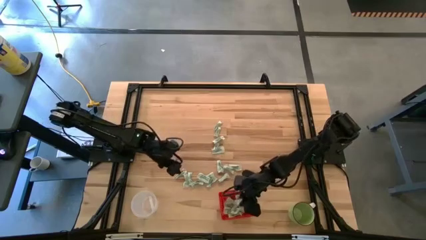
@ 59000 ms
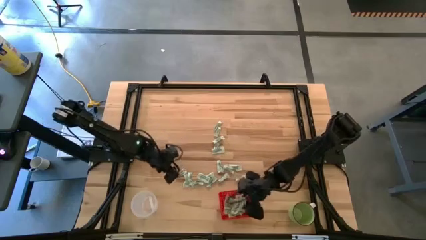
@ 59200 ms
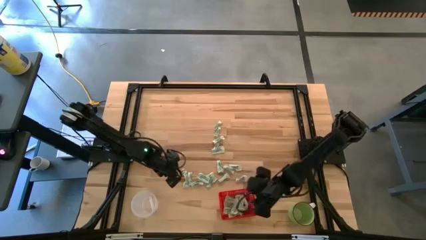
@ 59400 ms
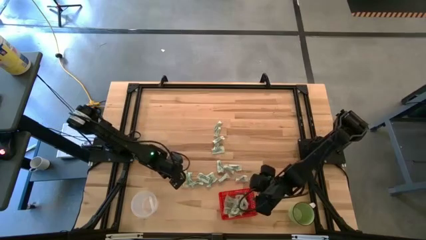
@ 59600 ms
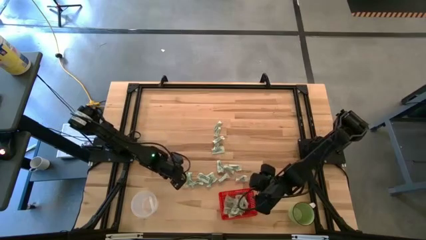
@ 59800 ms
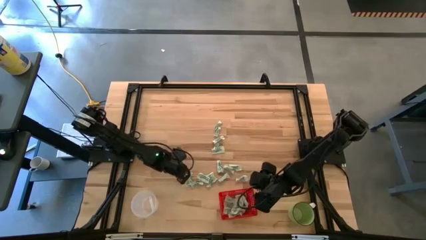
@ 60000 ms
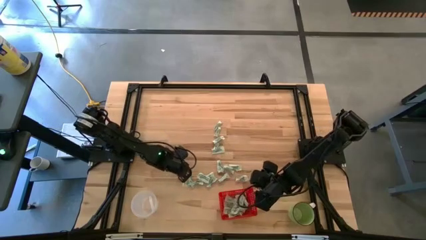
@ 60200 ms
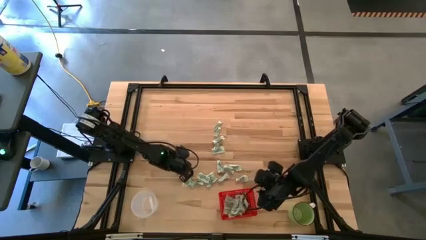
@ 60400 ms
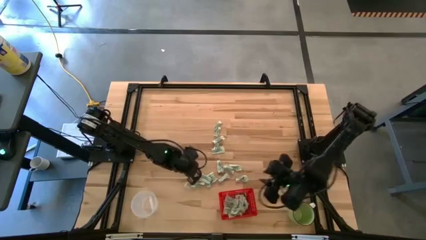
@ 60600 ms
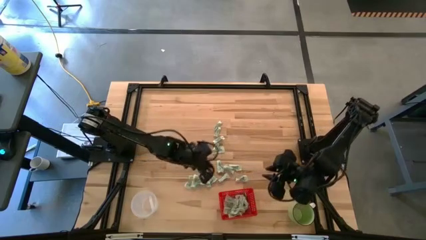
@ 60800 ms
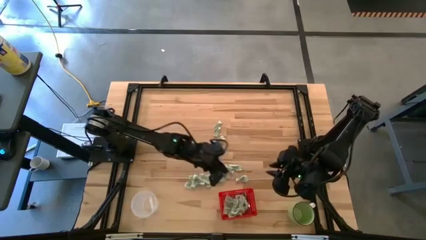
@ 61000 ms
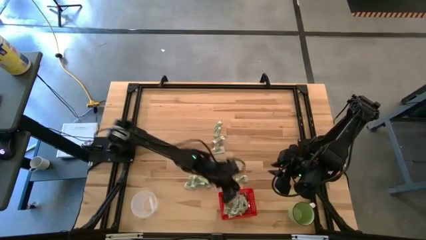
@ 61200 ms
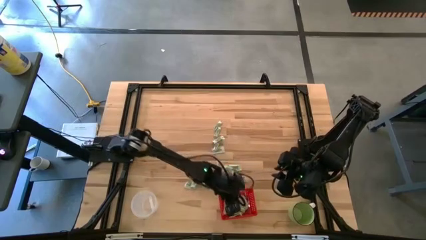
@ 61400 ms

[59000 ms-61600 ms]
Task: Pick and place items into bin
Put the white stevia packet into the red bin

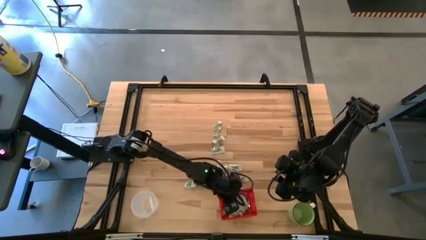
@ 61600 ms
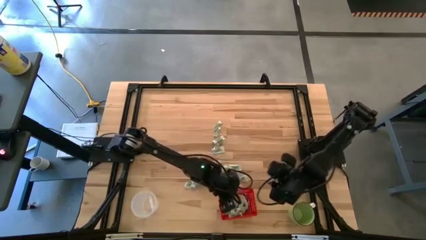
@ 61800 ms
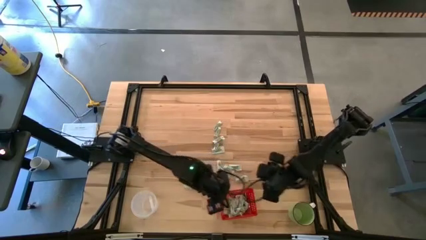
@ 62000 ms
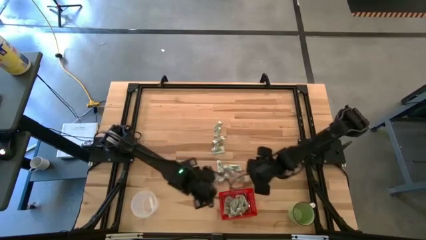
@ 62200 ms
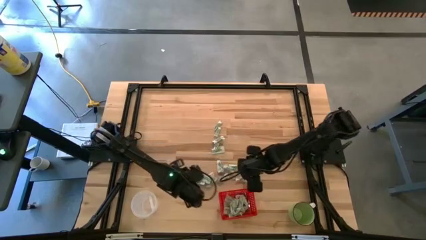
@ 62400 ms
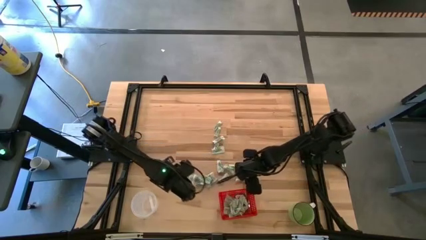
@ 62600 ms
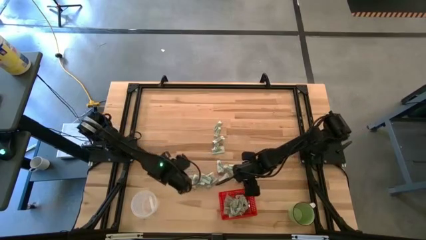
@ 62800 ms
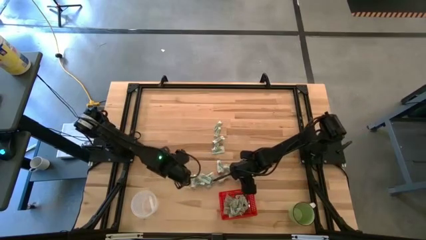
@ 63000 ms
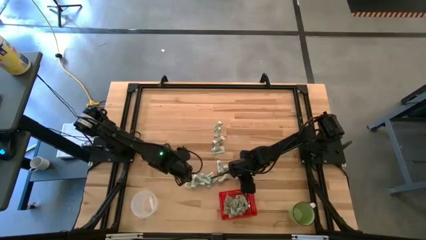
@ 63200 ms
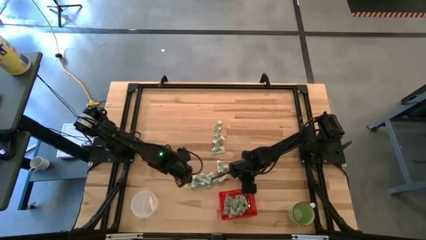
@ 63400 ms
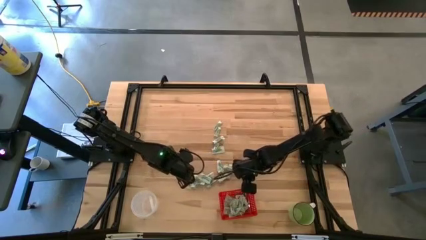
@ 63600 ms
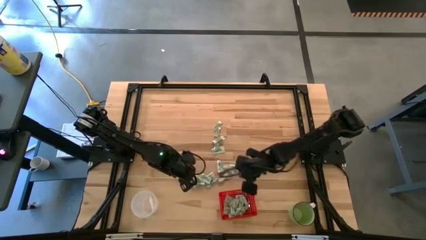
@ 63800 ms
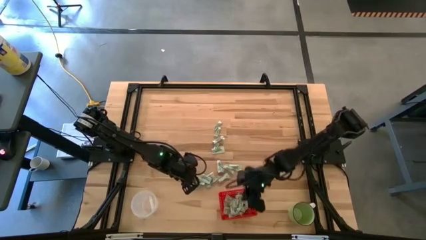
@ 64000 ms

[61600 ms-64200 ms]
Put the white stevia packet into the red bin

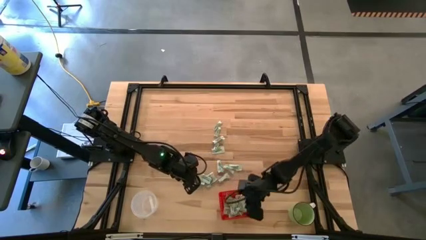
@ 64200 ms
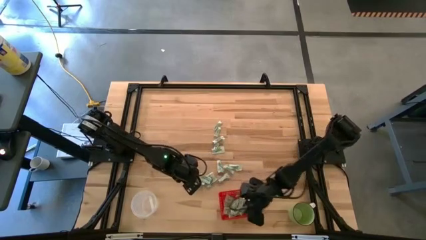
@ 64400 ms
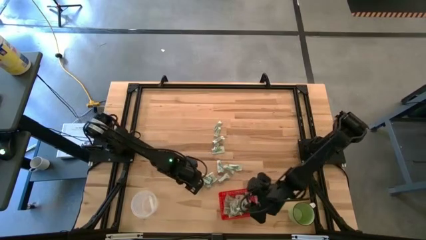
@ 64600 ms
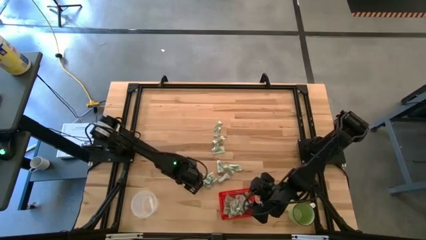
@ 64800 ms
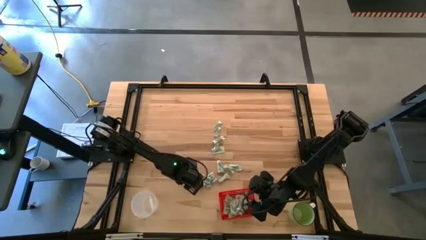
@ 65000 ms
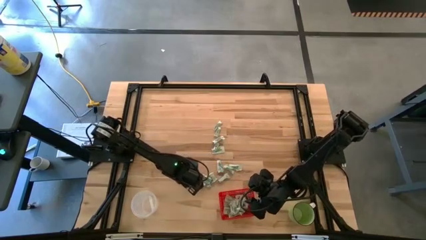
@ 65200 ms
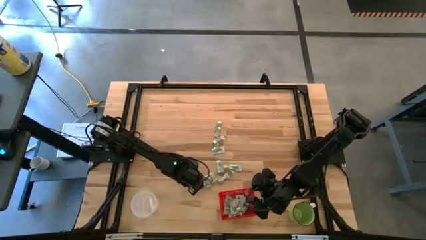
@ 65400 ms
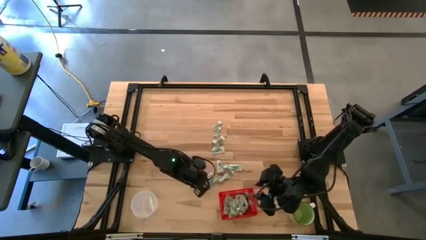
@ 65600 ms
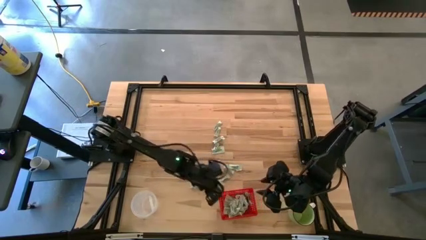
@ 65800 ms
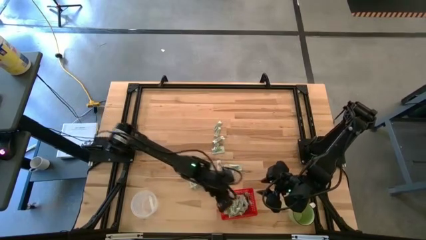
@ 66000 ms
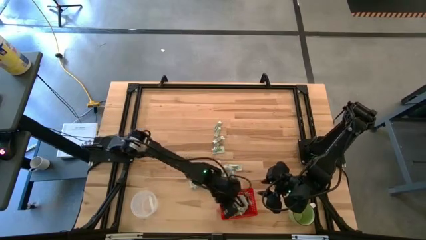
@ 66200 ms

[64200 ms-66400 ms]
Put the white stevia packet into the red bin

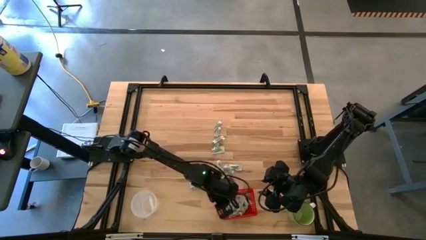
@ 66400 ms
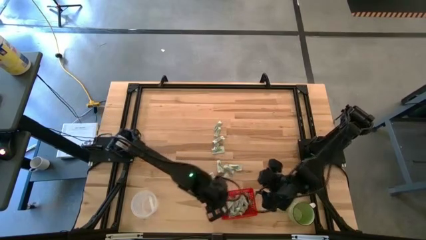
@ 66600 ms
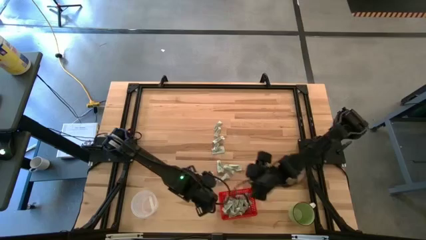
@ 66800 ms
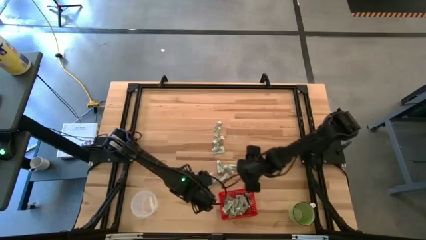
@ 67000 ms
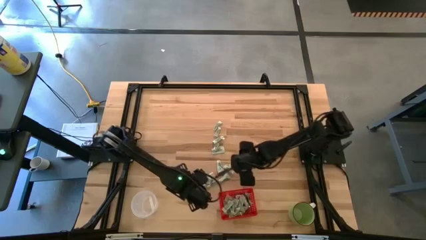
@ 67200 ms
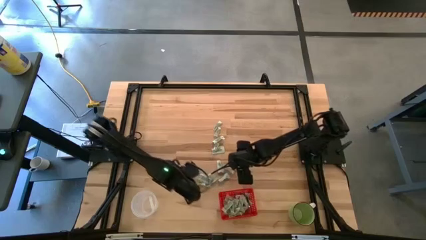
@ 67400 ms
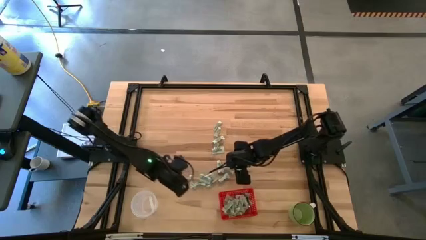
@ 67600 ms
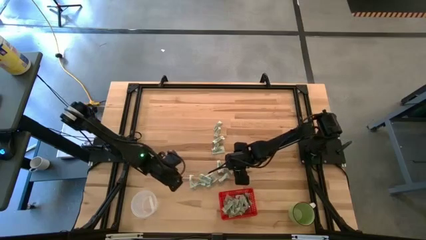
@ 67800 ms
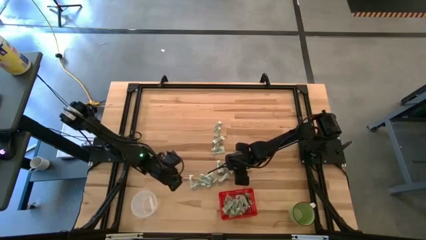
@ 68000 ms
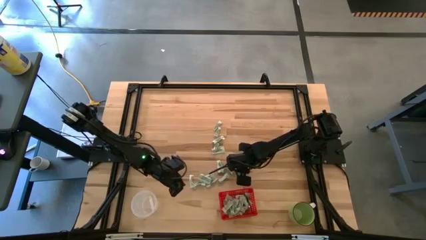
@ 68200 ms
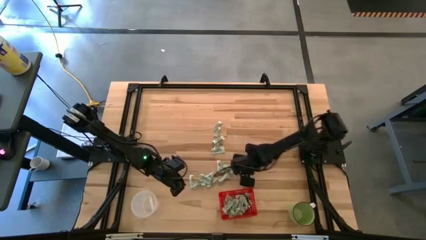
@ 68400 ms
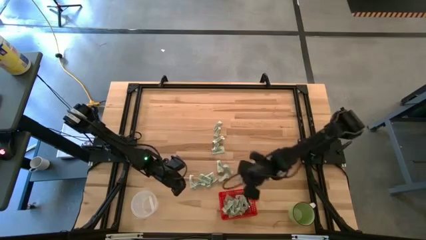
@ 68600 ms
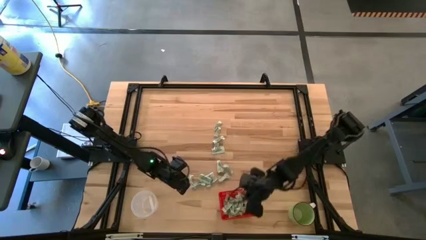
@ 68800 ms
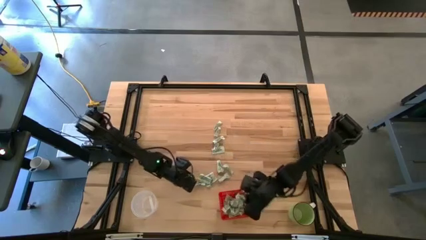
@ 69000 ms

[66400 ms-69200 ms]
Put the white stevia packet into the red bin

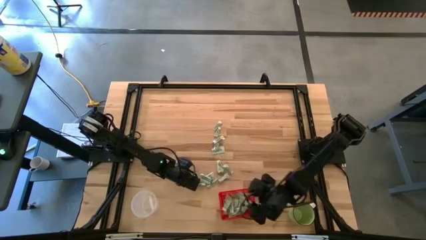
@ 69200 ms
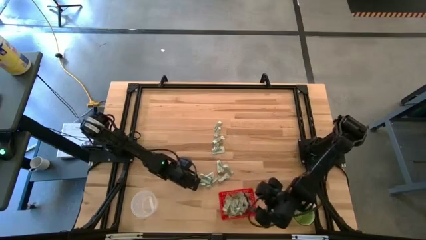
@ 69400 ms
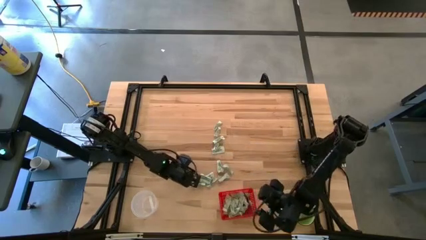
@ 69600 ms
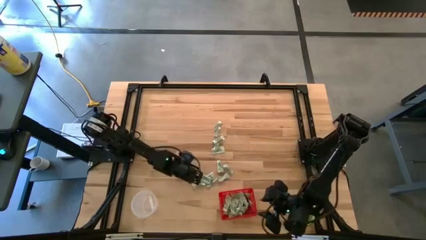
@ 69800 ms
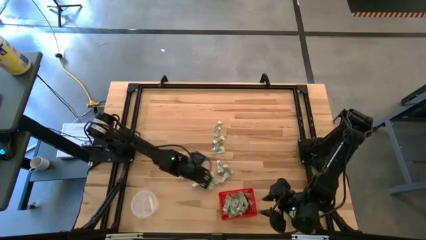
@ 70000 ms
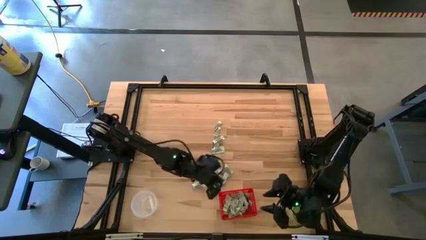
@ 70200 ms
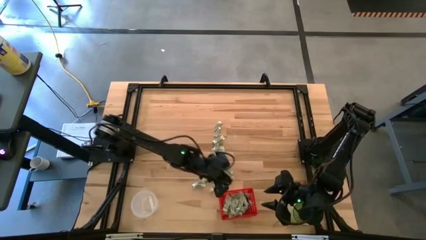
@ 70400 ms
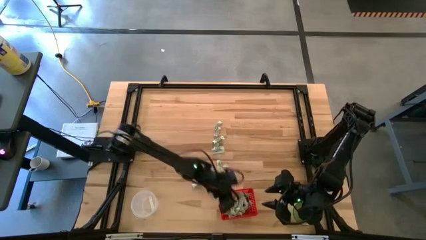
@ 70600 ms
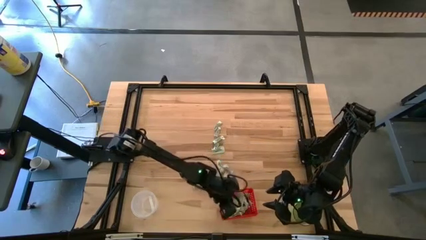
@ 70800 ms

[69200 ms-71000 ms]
Put the white stevia packet into the red bin

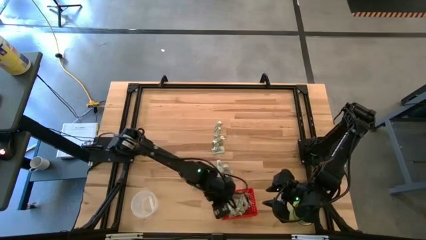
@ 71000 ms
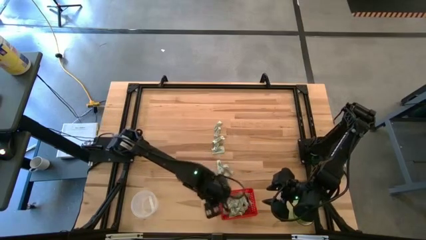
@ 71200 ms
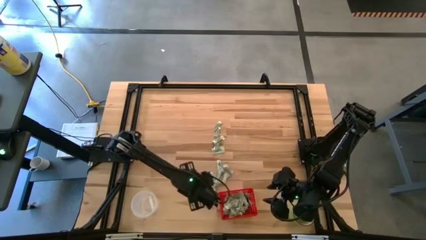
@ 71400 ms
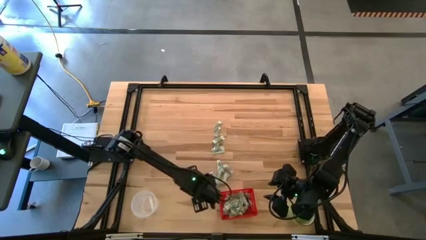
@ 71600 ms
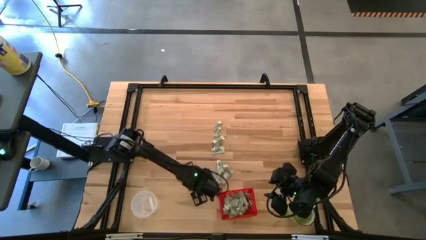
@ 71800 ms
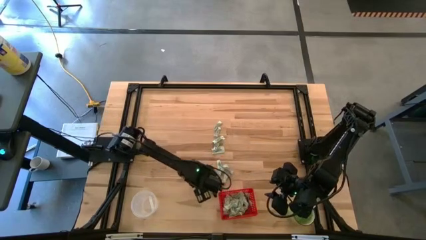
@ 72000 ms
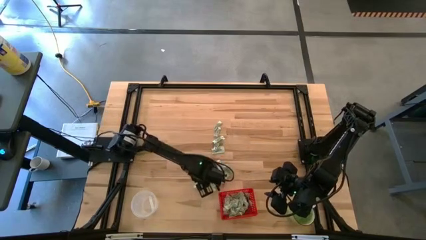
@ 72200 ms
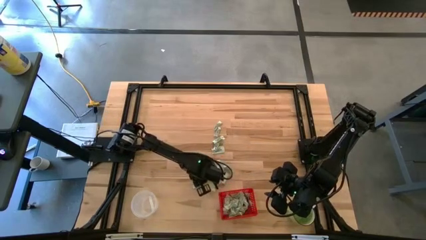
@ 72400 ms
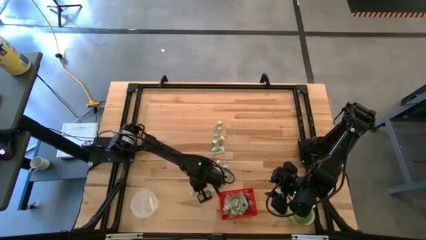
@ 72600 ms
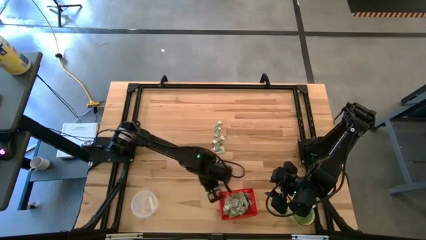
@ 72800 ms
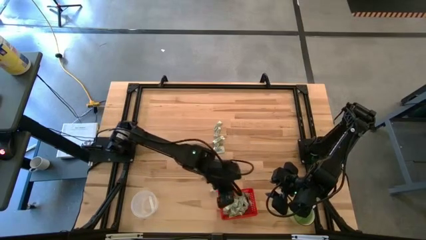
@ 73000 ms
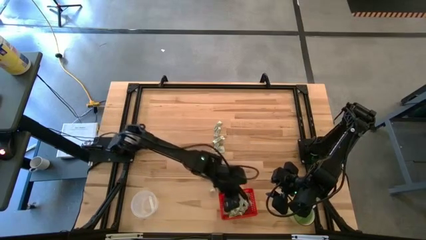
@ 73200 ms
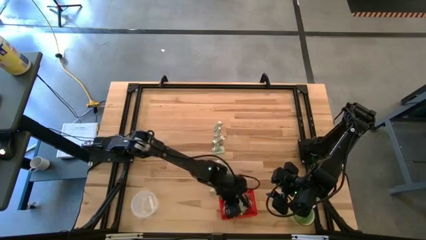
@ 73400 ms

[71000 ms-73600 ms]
Put the white stevia packet into the red bin

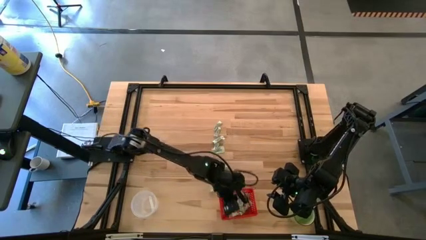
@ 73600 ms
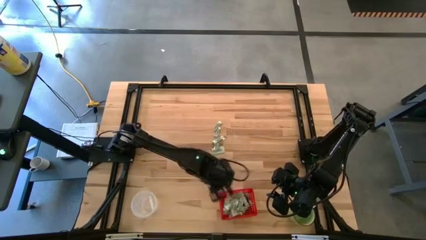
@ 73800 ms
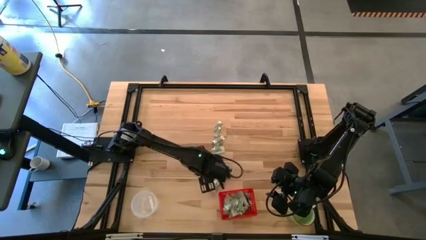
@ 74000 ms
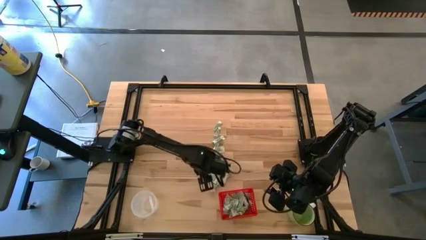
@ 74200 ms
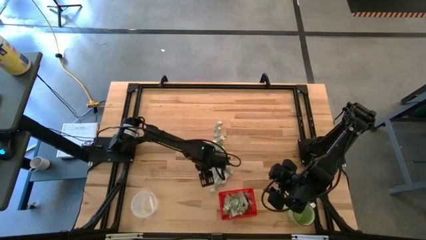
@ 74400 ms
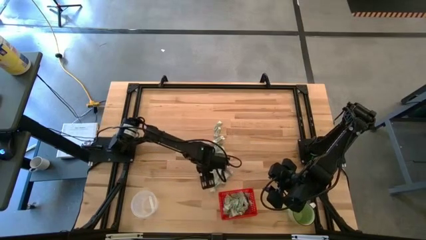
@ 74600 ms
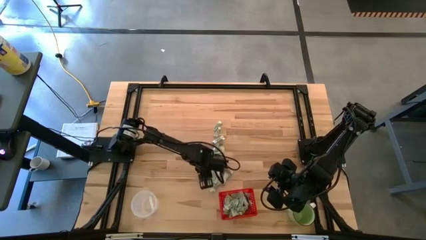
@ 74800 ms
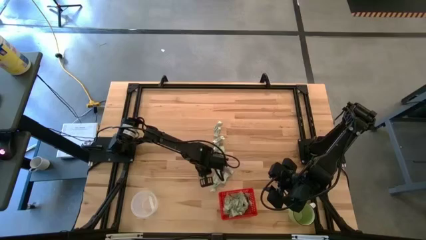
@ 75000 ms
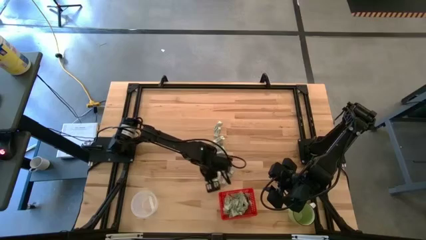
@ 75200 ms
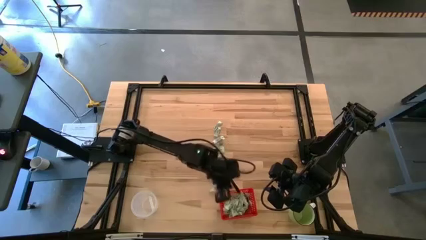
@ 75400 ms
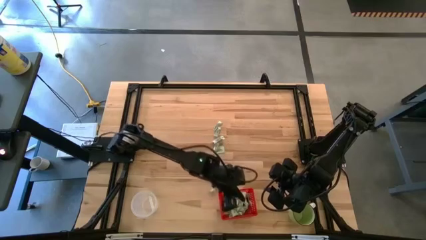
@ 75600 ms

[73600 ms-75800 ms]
Put the white stevia packet into the red bin
